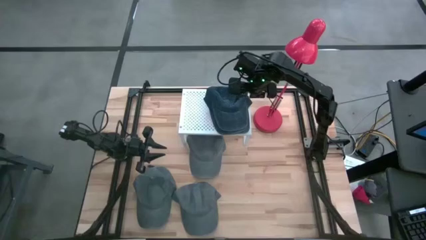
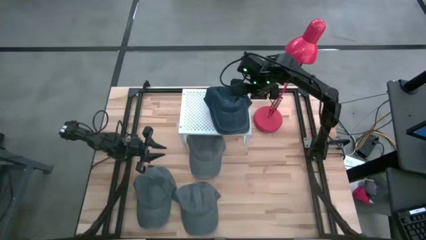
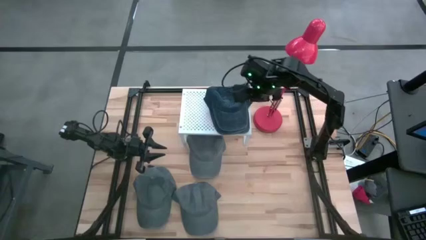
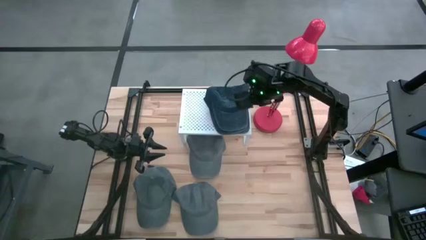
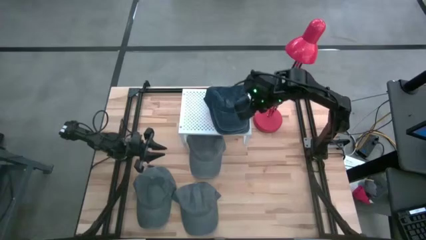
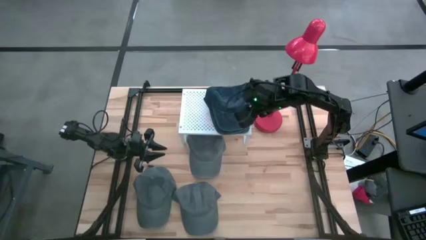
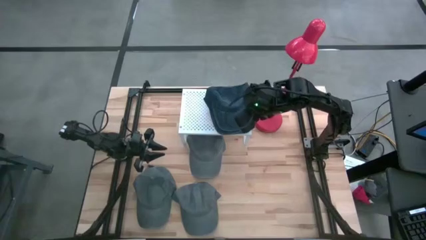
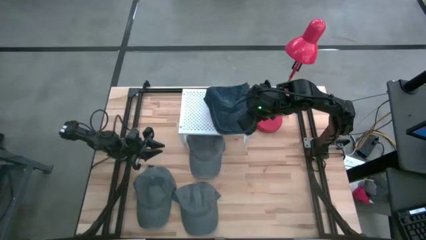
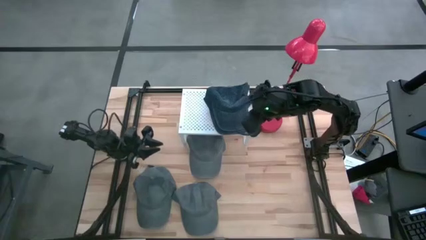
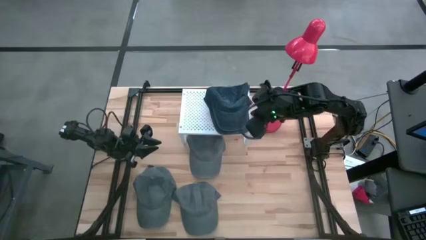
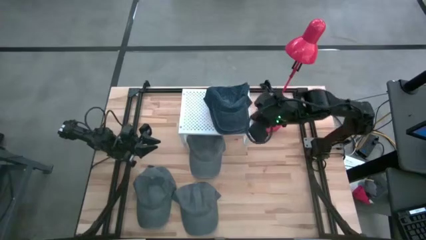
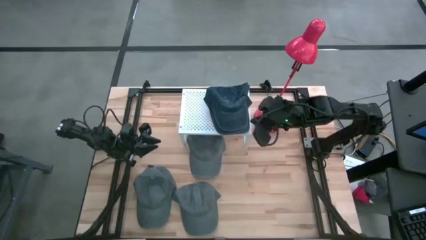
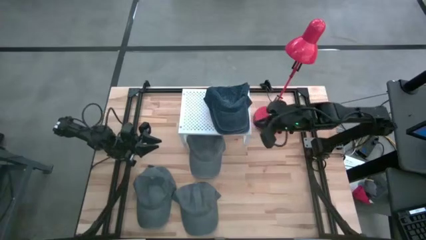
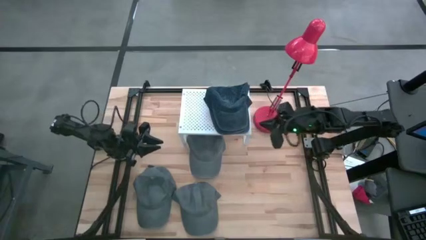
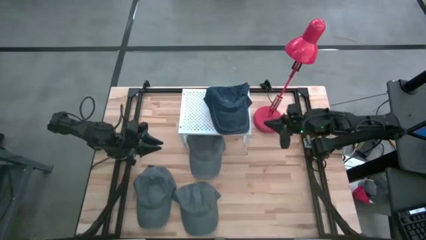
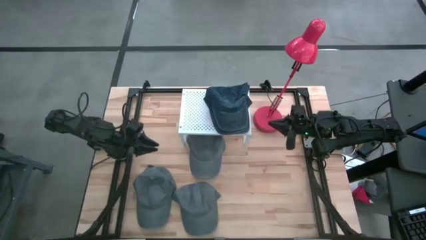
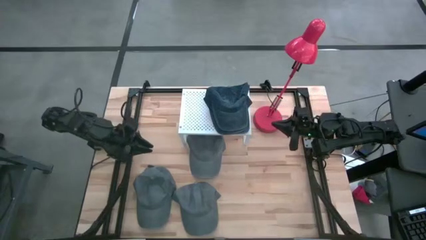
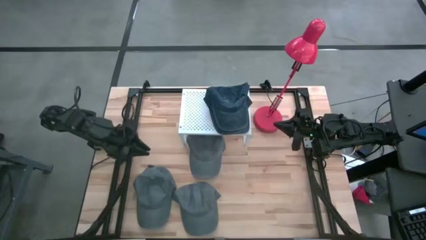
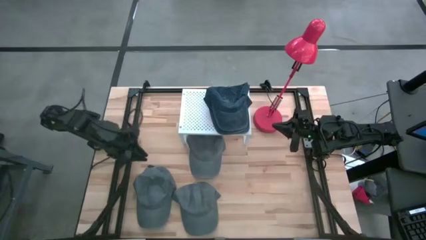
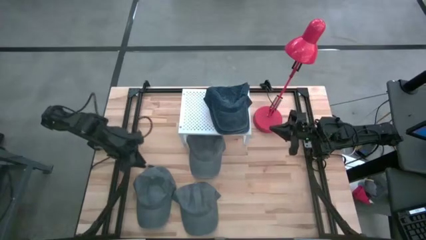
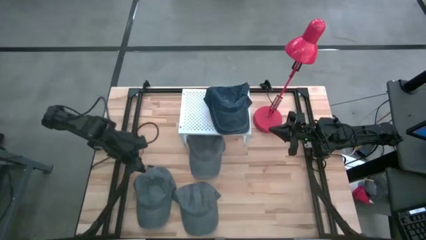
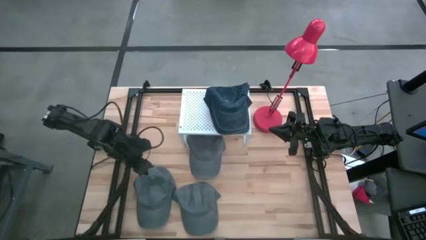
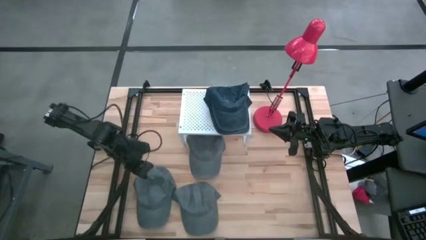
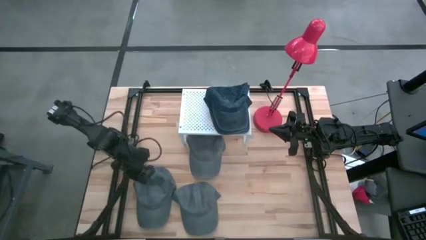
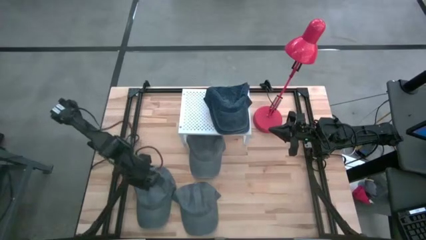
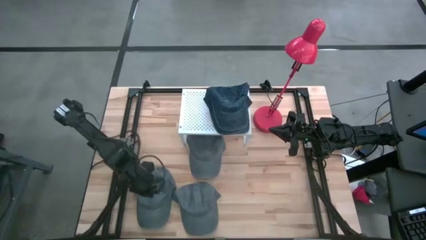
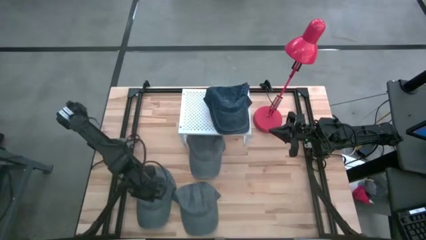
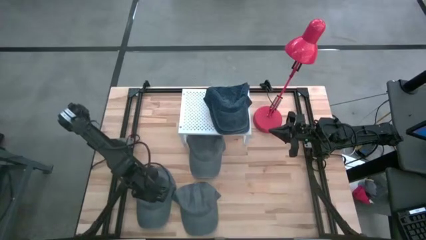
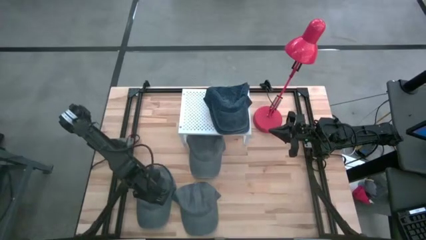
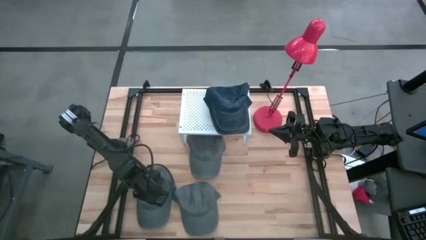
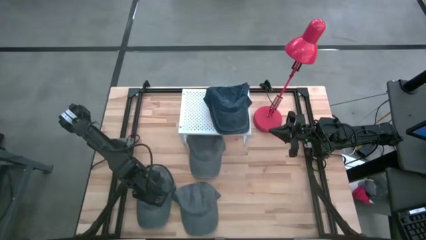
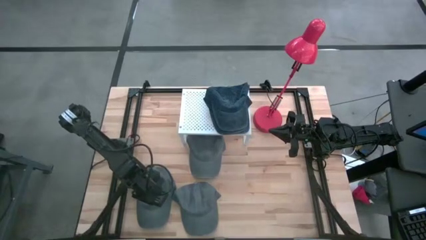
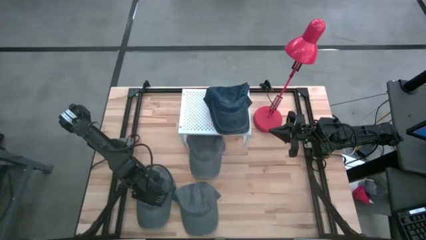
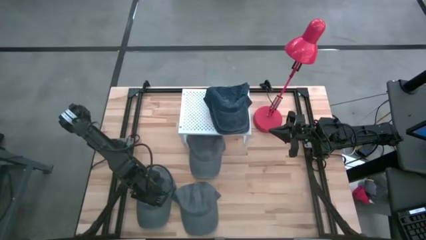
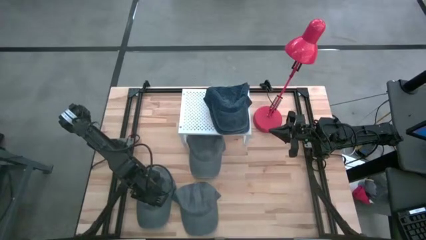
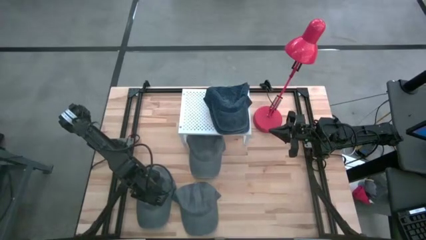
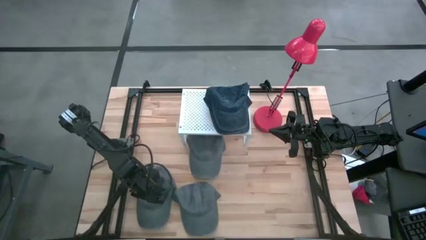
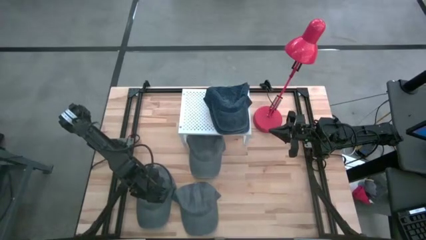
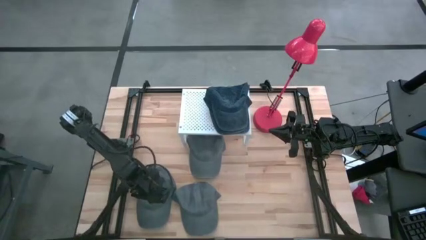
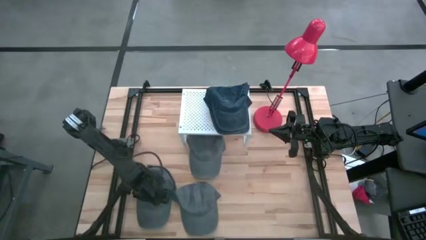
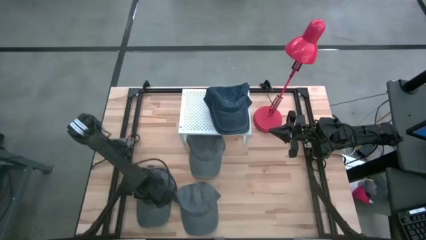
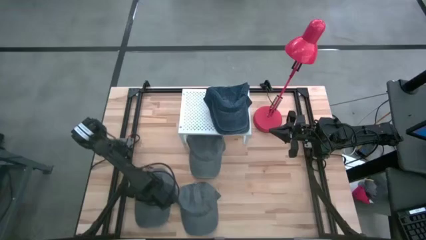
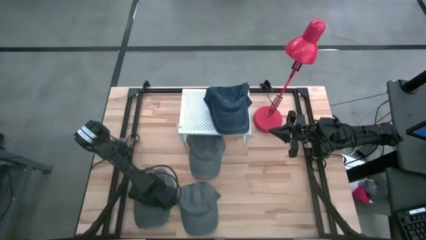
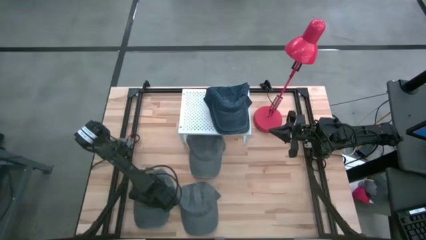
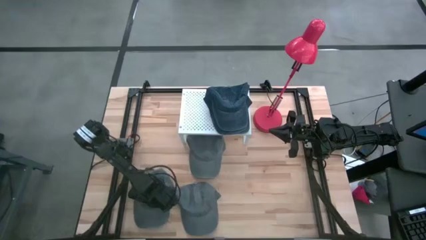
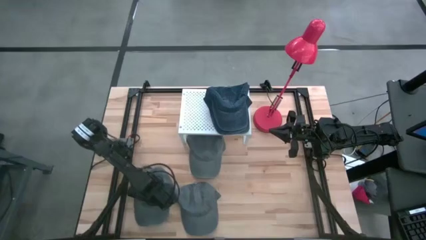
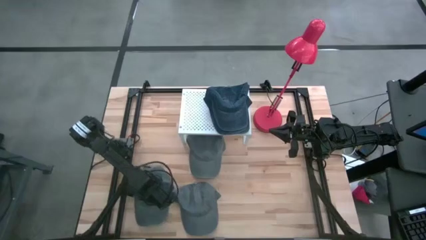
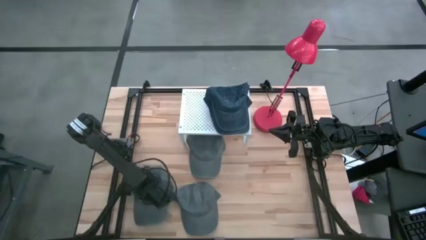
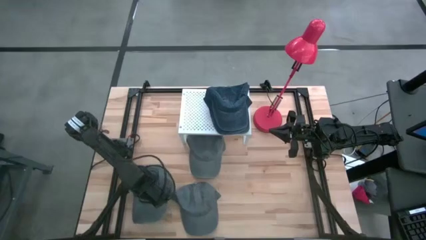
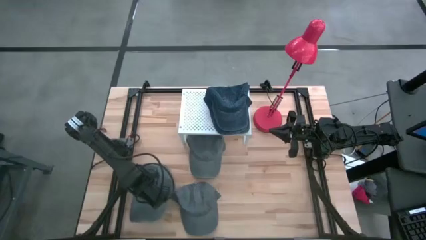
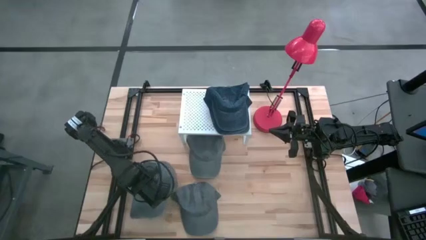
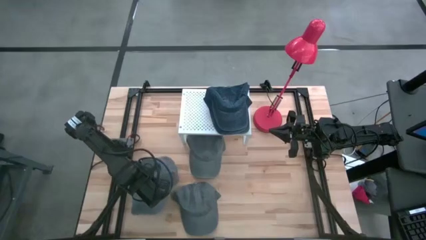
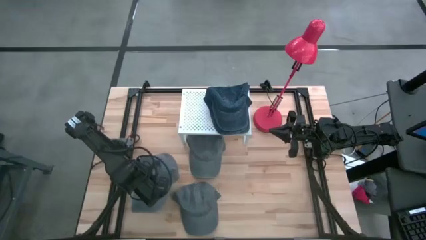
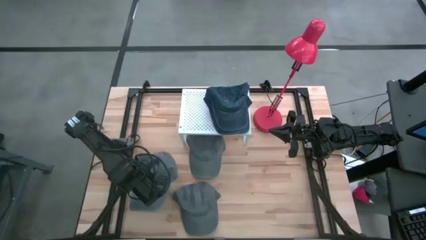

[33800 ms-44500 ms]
Task: Pick & Place hat
Put the bottom left gray cap on the shelf

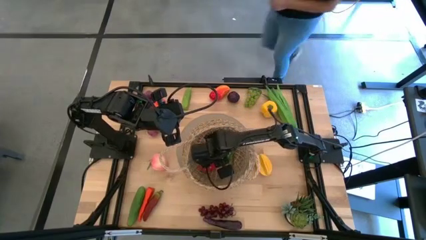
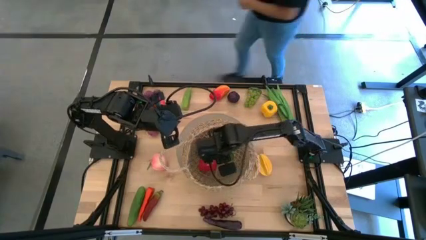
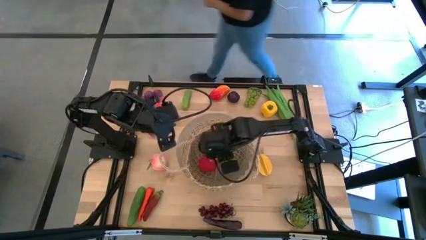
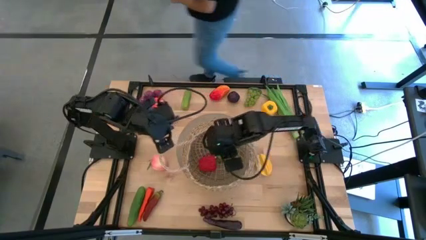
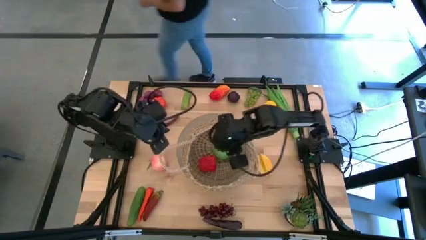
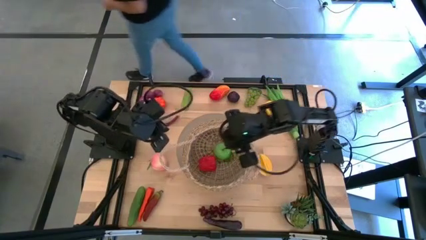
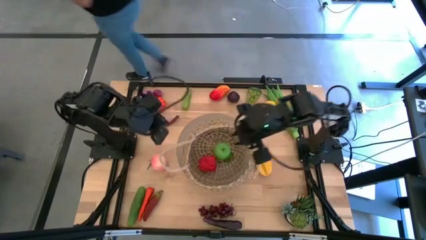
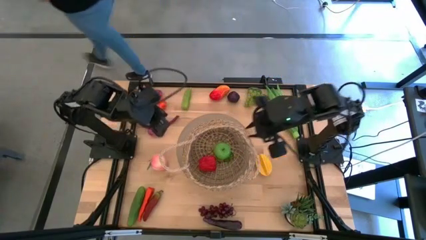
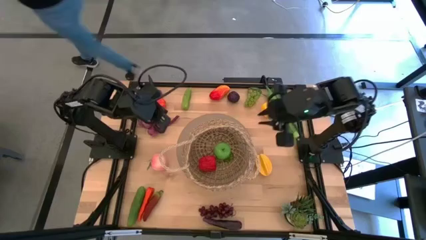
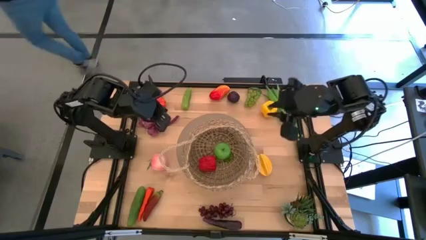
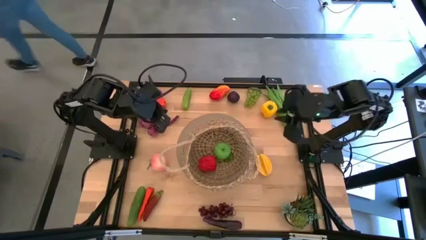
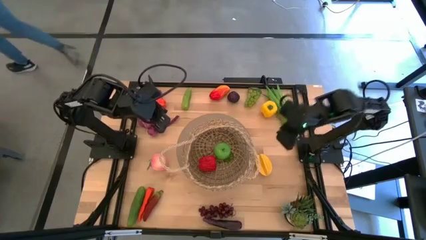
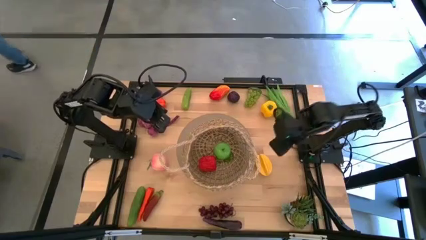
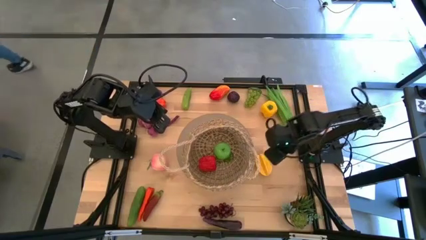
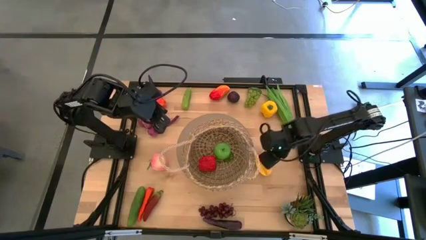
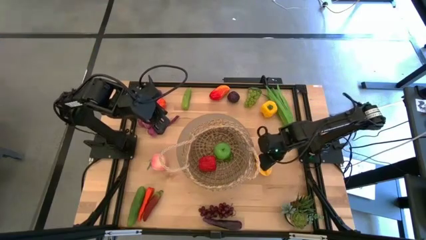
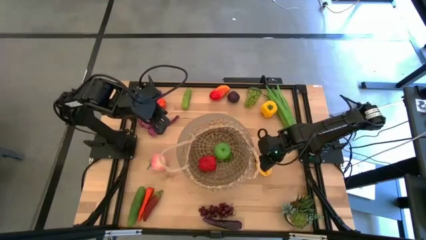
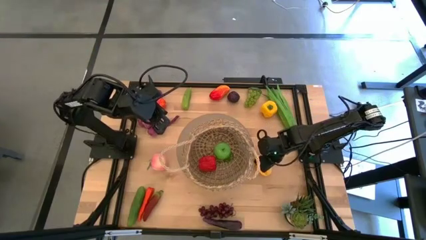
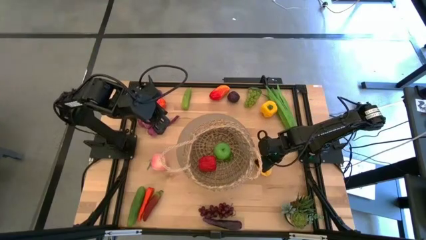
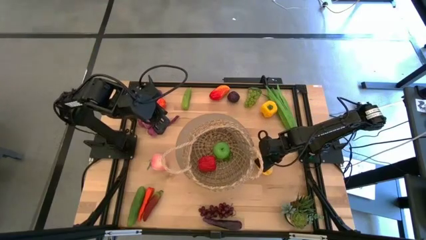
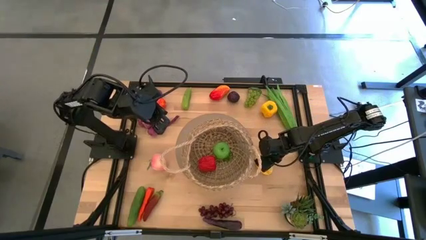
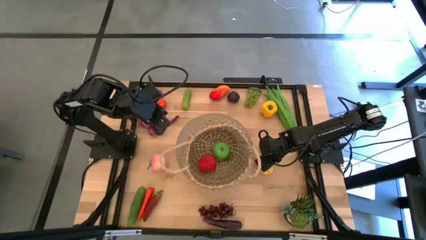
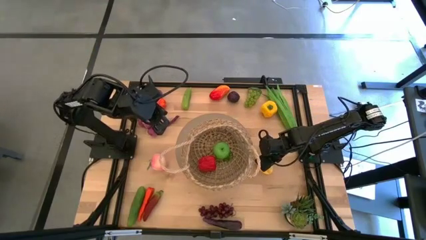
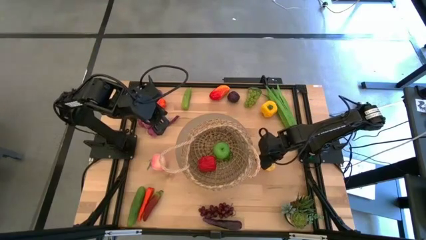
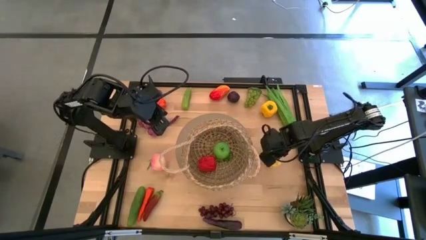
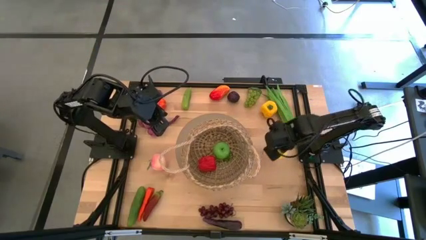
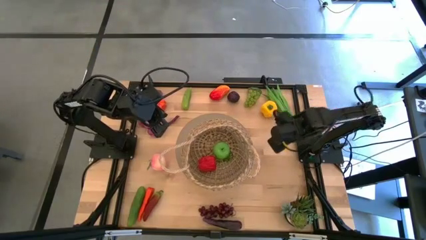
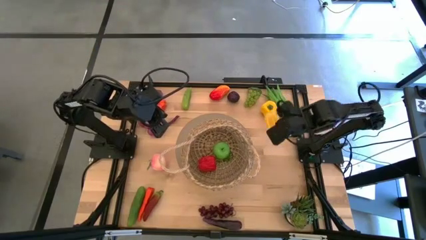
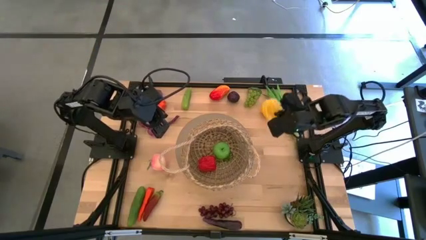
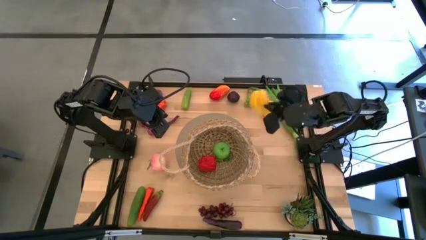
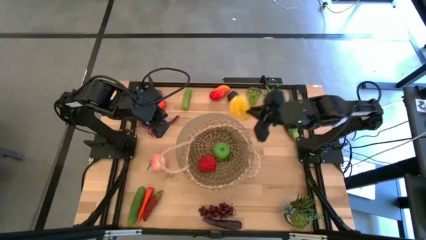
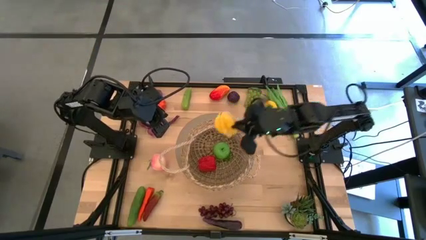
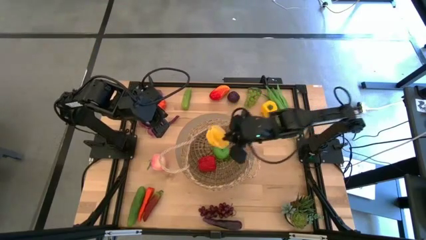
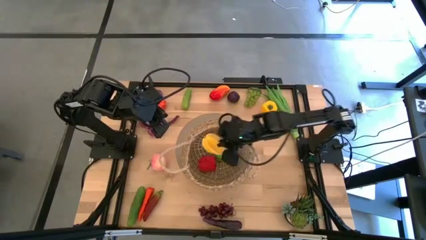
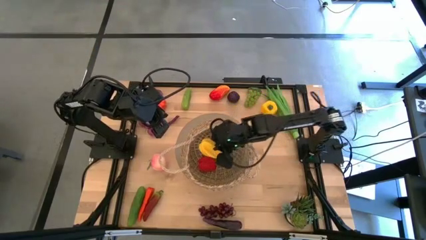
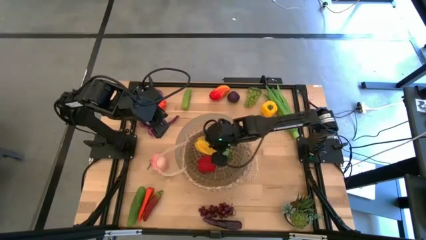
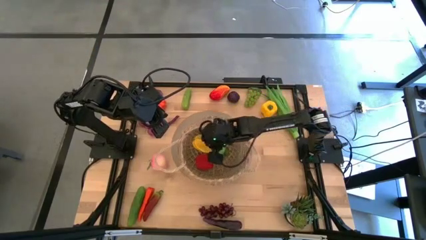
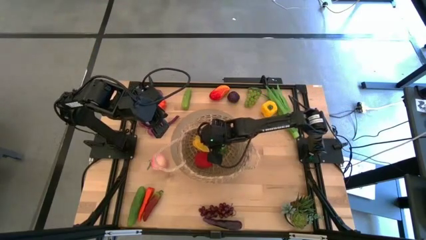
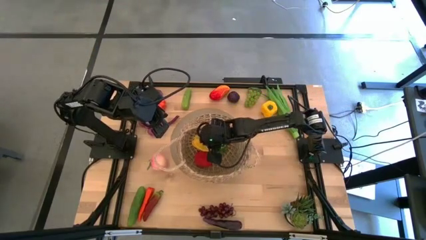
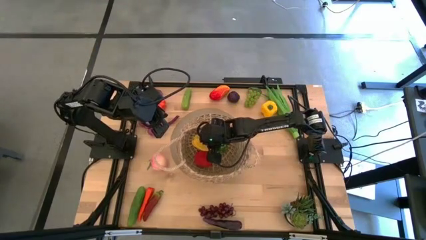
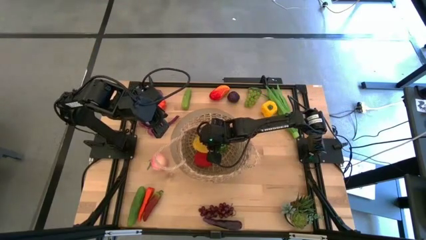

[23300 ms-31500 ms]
Task: Build produce basket
Put the yellow starfruit into the brown basket
